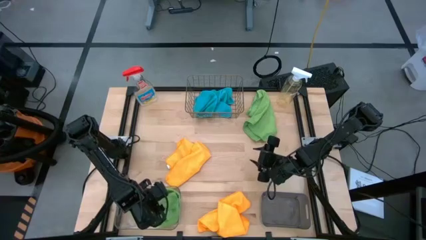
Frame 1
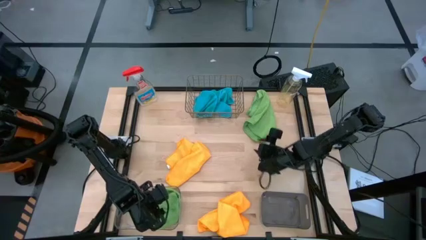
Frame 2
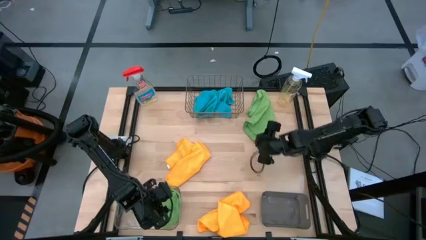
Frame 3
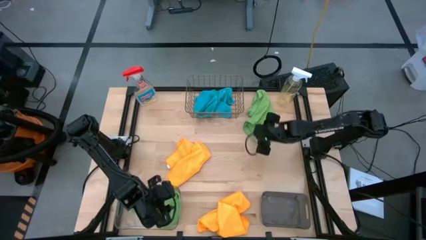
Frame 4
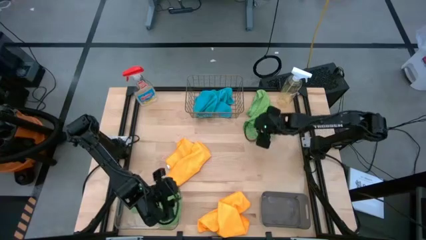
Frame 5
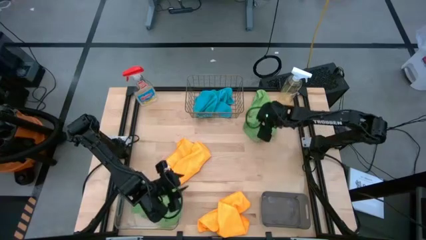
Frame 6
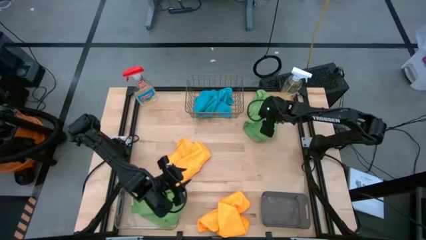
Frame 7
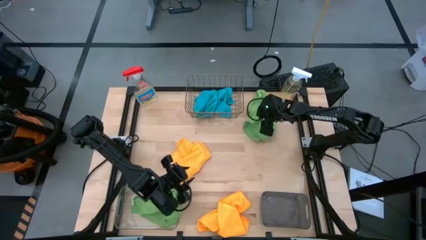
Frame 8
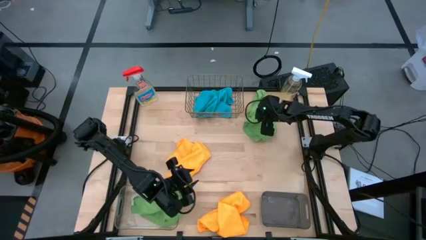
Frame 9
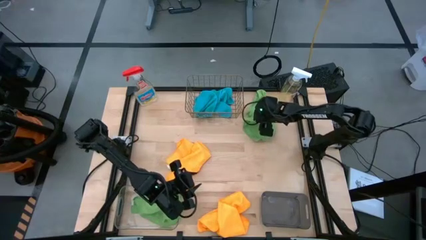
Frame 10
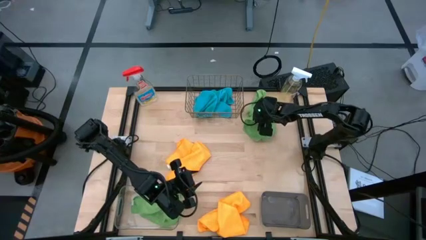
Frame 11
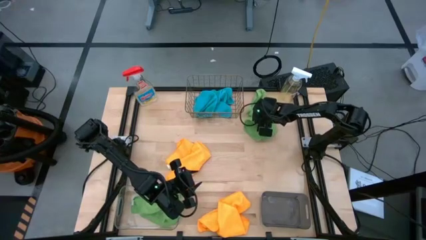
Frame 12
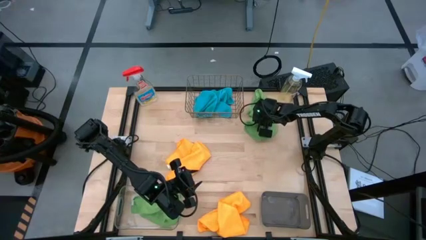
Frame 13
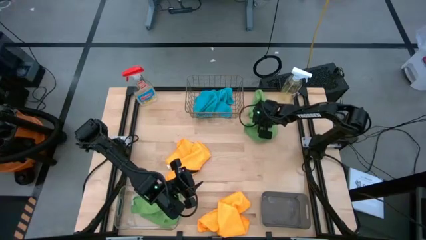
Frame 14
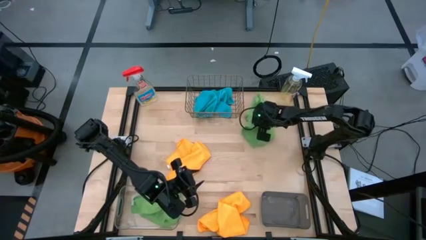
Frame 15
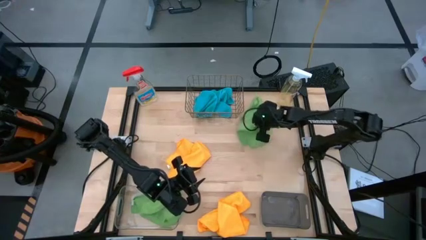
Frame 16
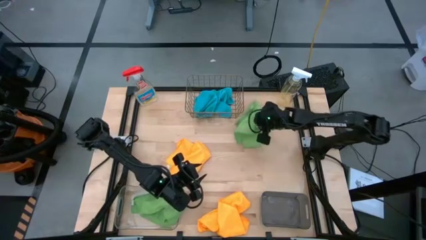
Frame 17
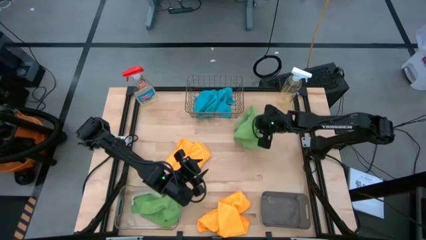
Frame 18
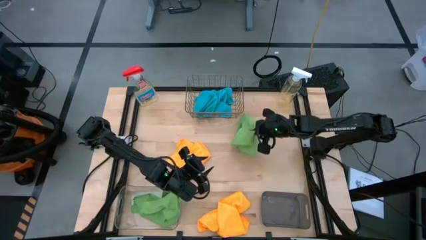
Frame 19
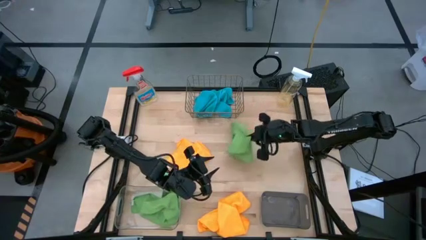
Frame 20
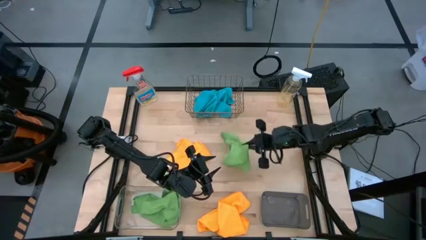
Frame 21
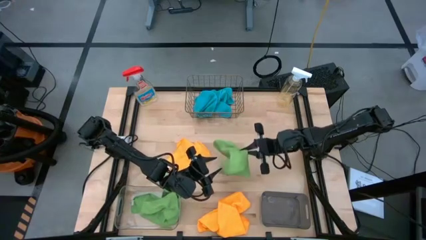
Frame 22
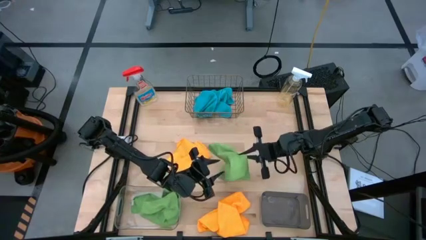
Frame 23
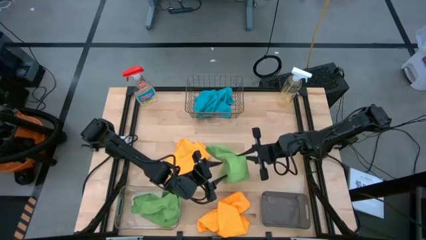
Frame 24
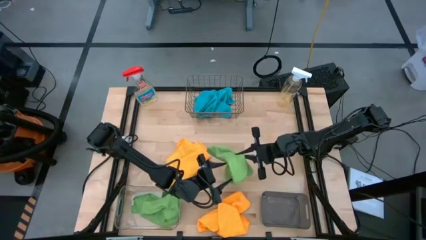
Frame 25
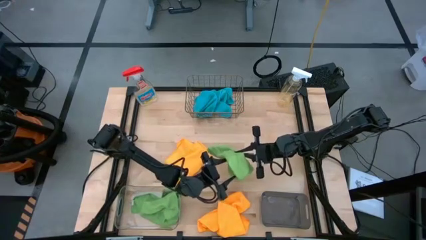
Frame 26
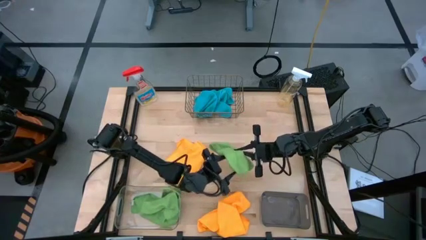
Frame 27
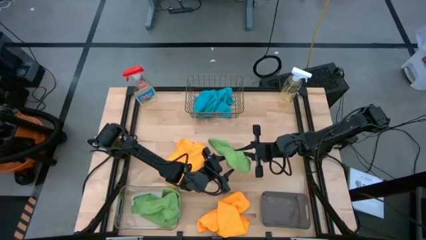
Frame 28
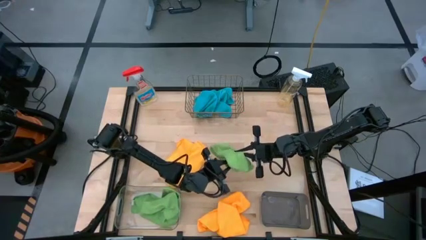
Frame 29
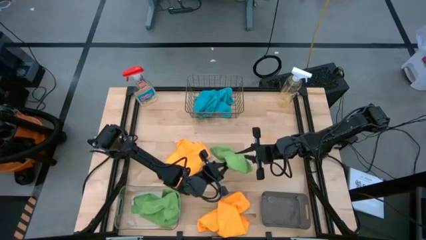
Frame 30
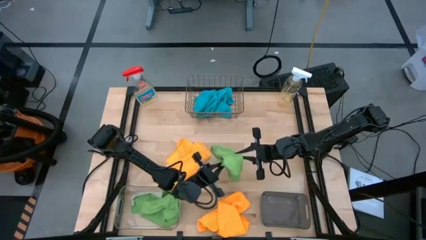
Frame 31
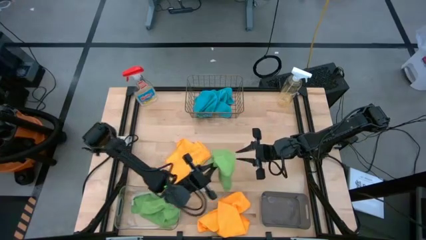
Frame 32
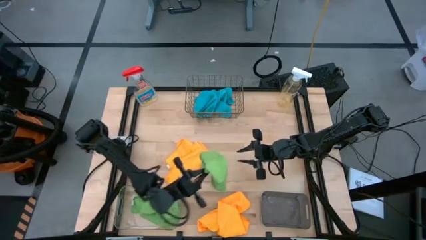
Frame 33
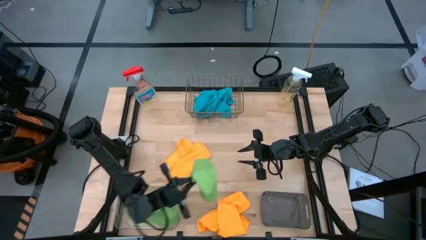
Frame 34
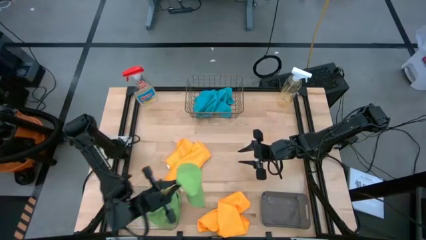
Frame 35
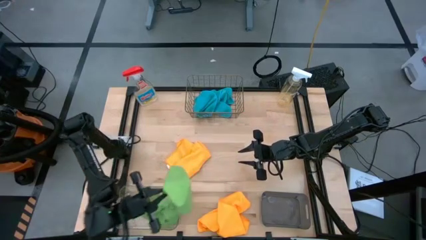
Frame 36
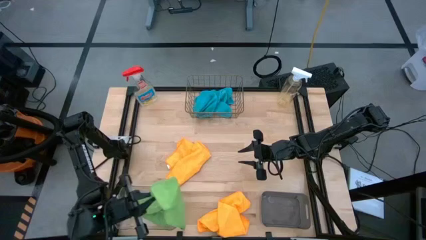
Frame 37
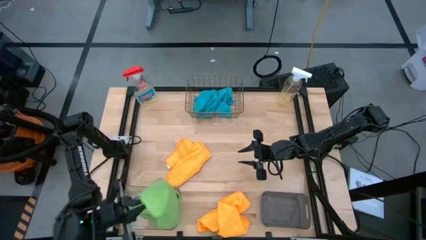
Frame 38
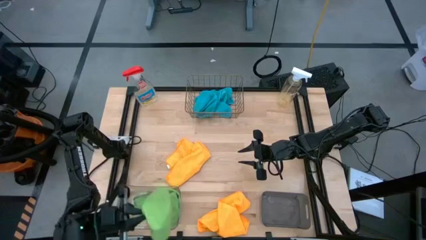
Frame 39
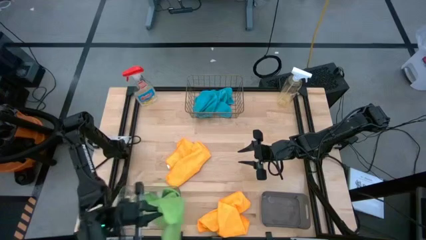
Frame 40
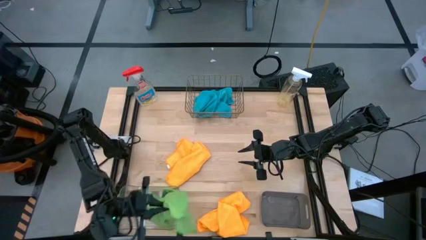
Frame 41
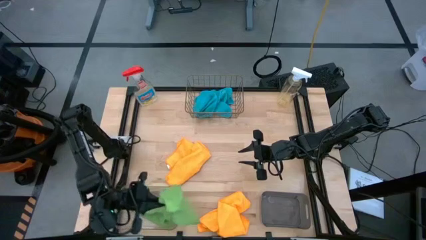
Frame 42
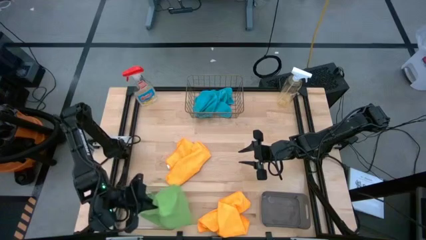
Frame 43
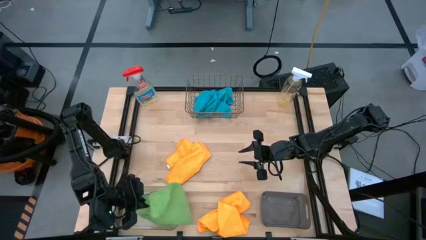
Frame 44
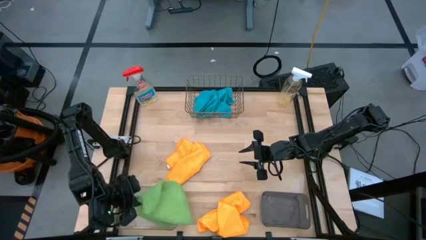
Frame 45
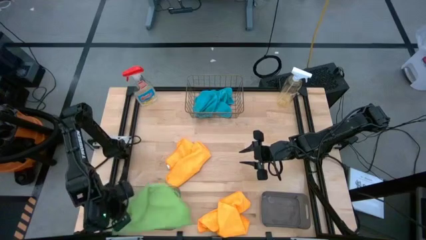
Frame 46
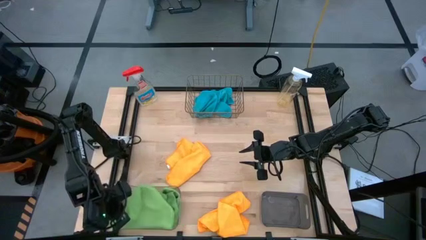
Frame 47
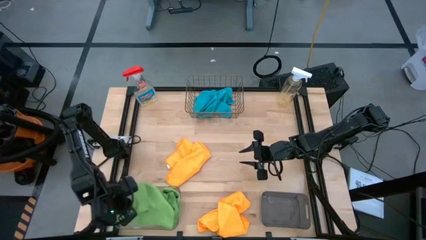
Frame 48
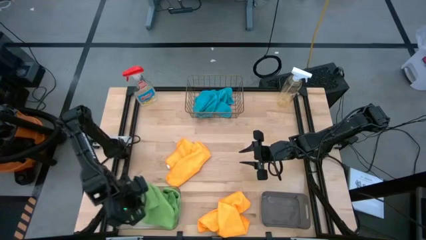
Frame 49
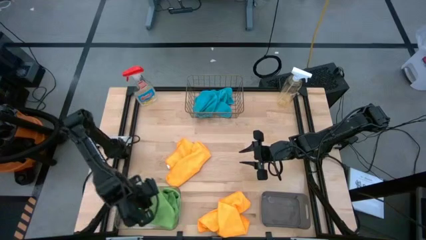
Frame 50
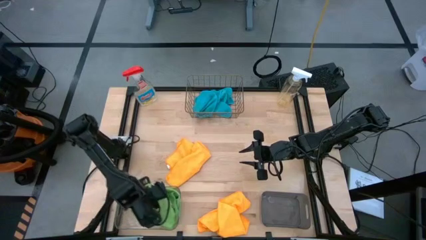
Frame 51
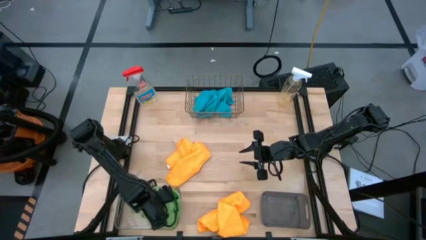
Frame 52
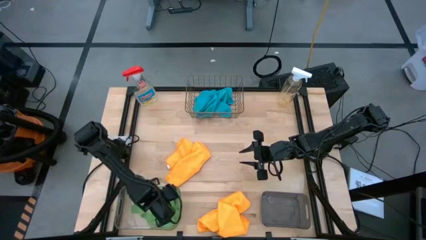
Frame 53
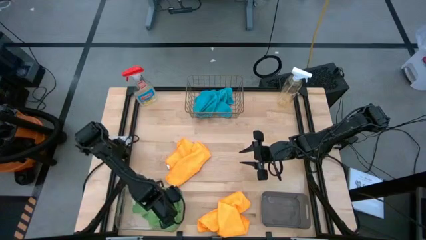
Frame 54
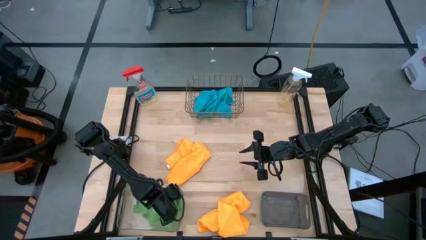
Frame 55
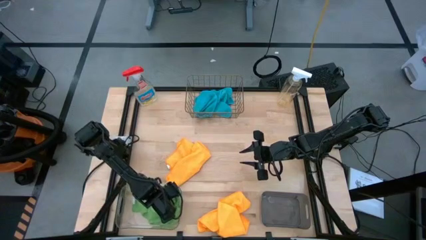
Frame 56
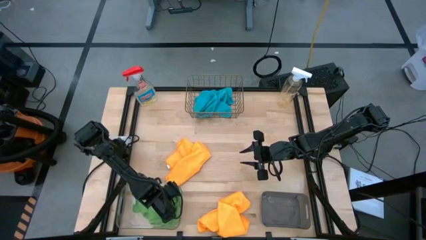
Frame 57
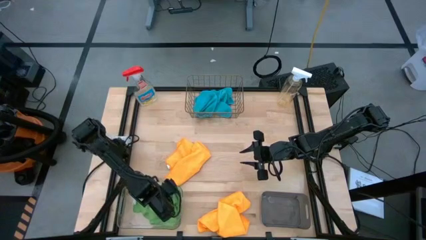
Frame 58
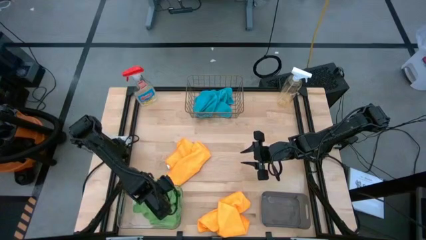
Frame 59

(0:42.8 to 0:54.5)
Task: Sort microfiber towel by color & place in baskets
Put the green microfiber cloth into the transparent bin
